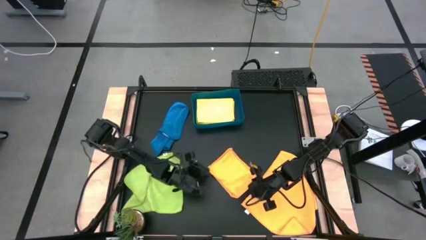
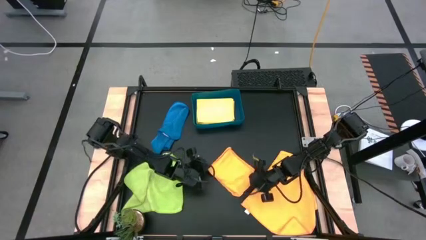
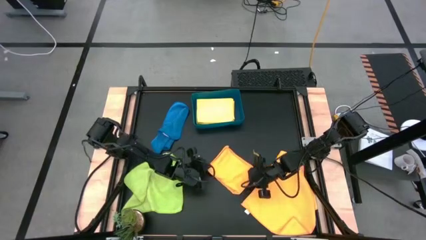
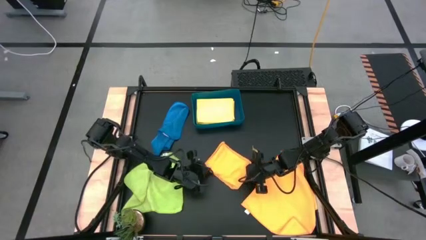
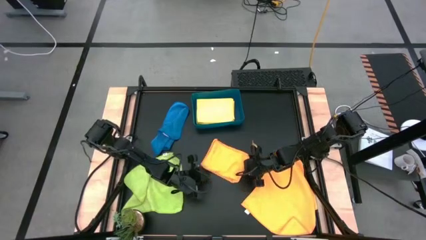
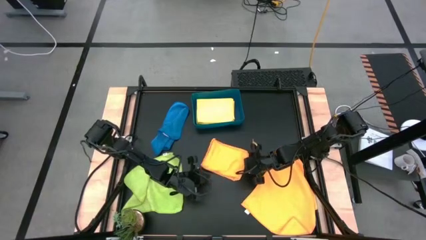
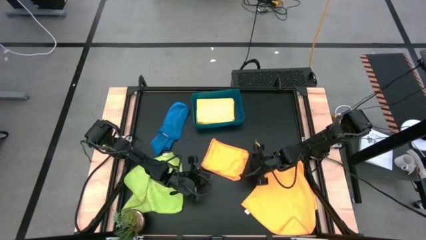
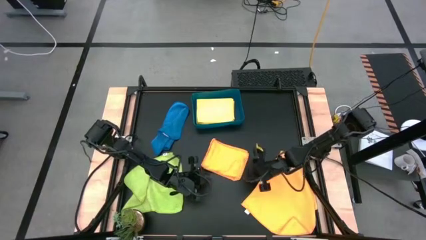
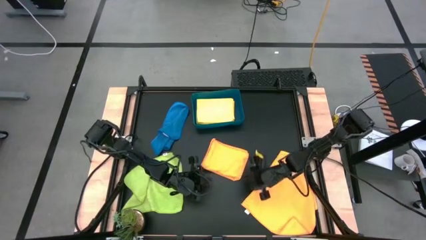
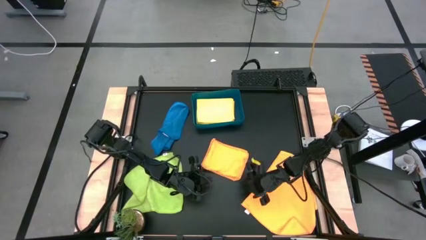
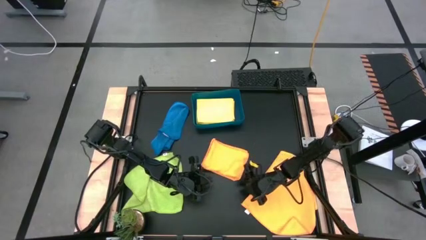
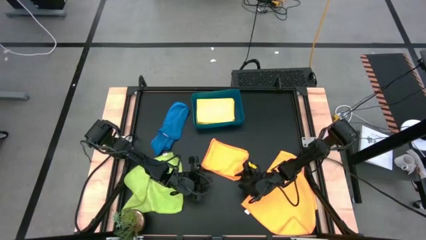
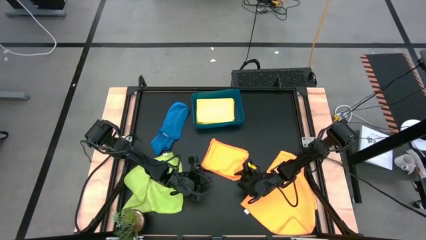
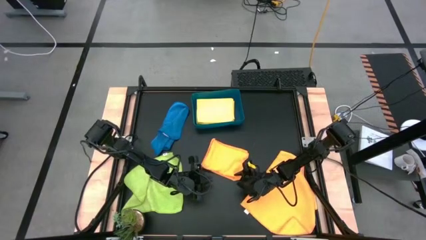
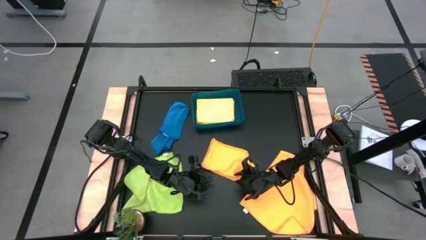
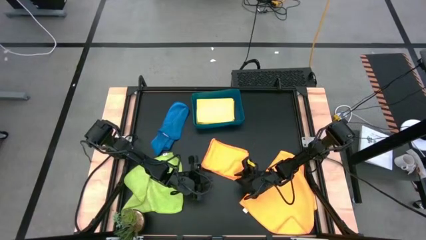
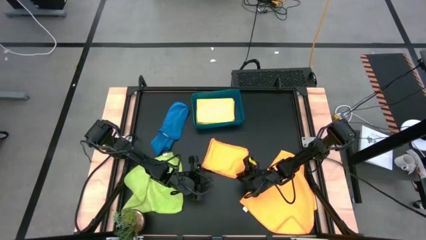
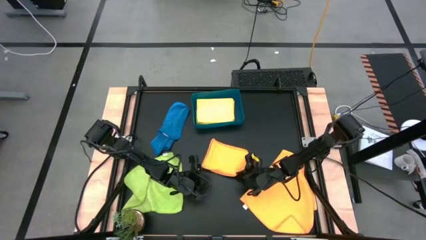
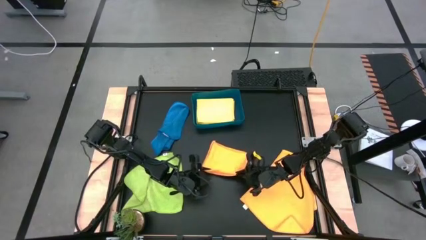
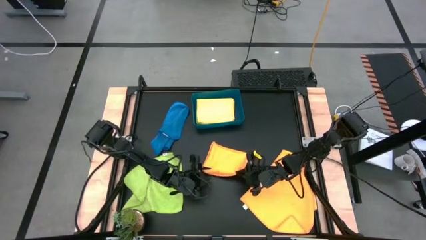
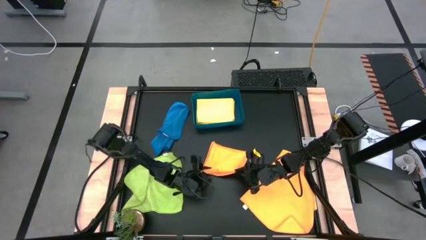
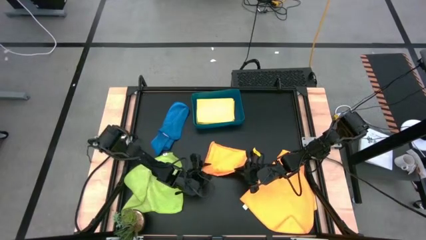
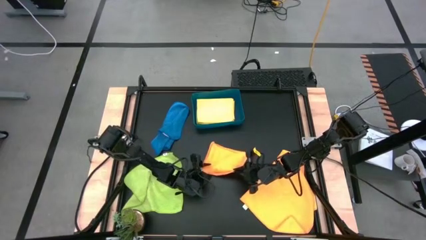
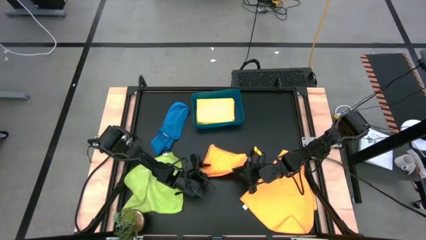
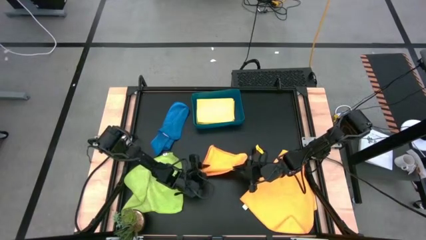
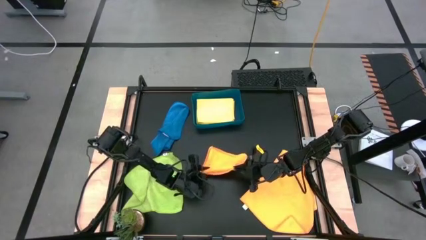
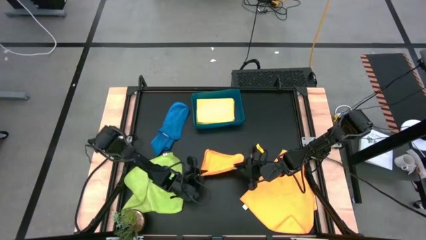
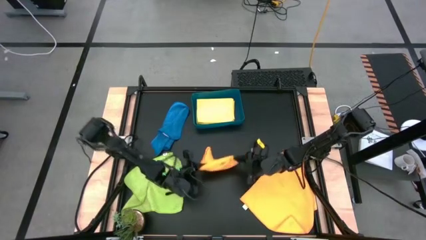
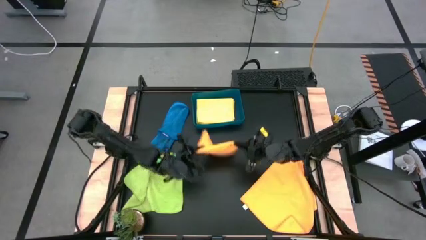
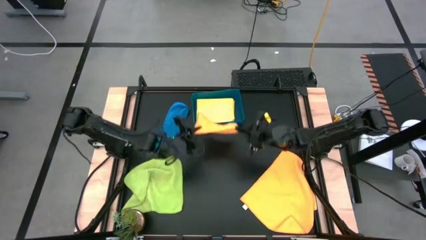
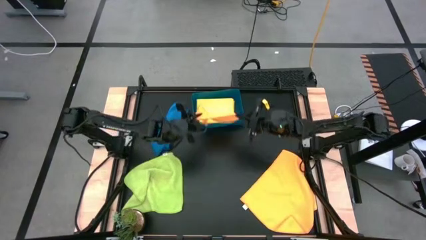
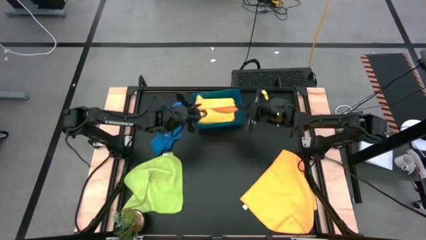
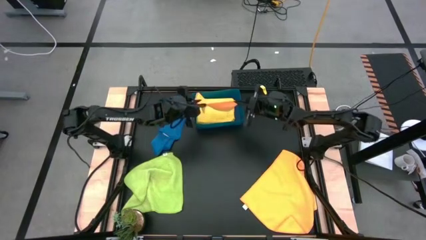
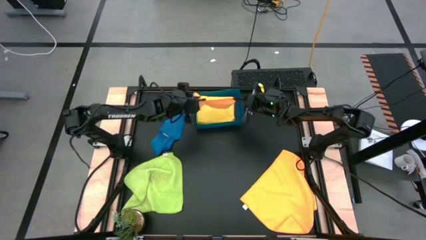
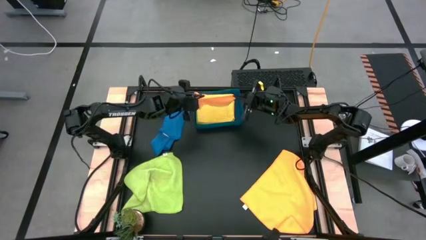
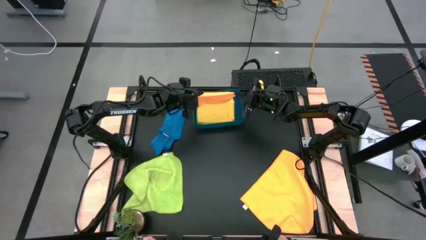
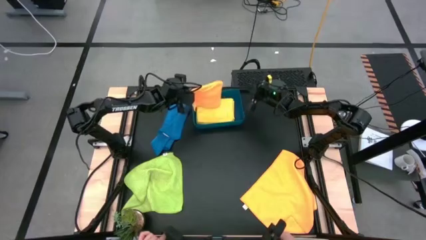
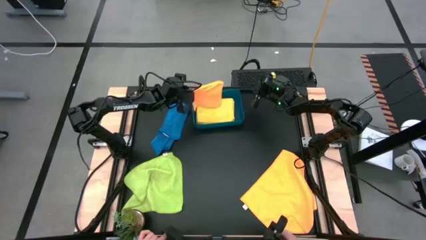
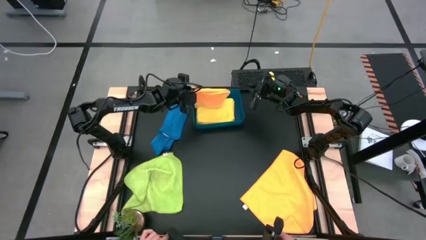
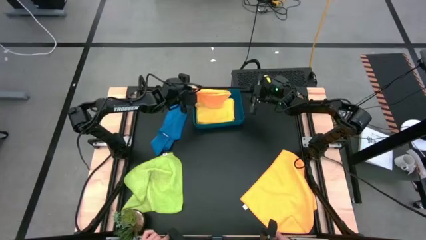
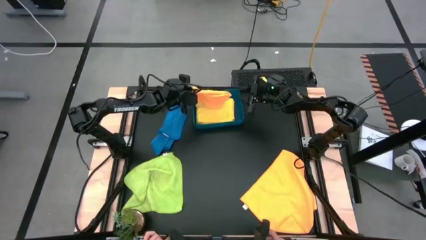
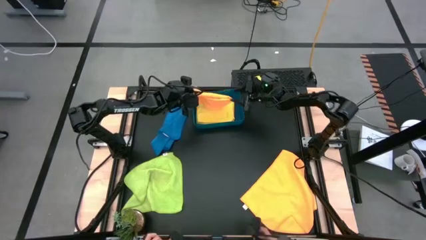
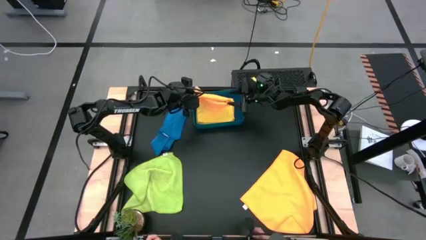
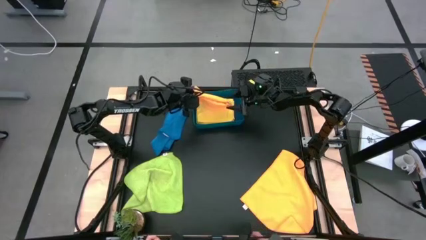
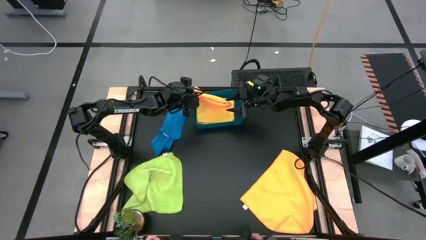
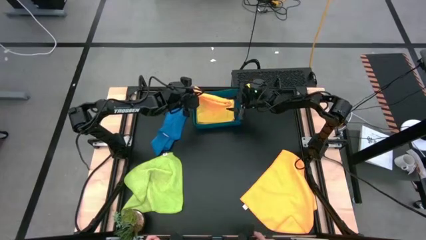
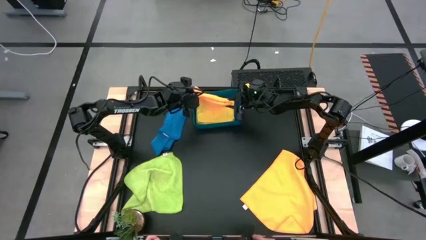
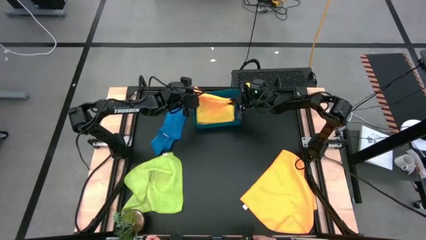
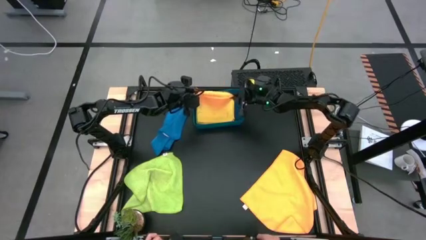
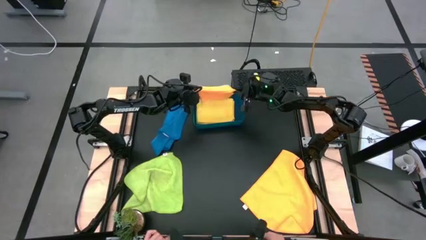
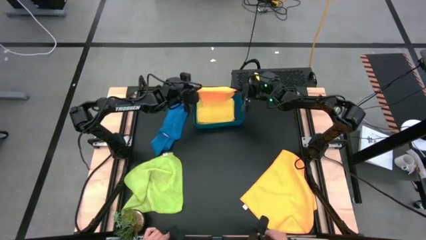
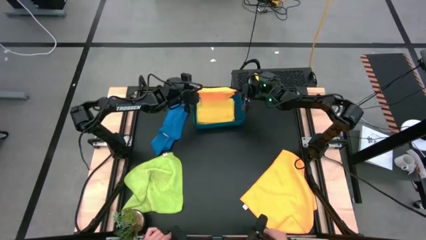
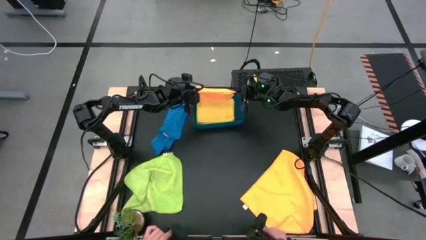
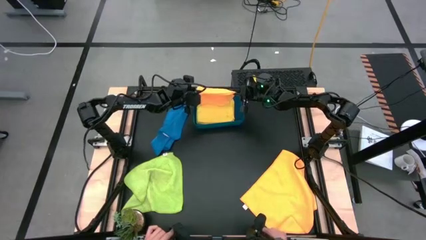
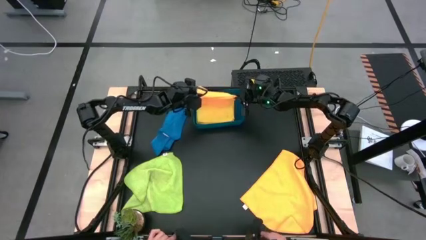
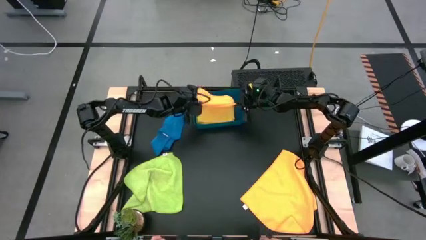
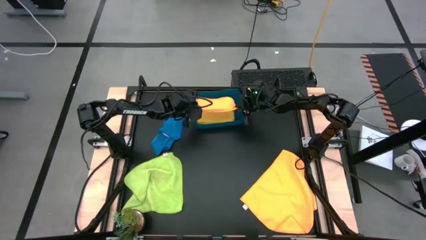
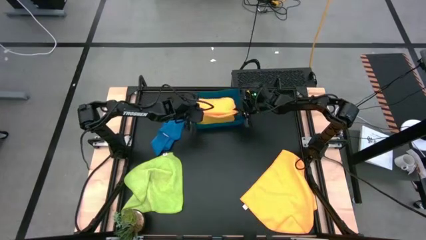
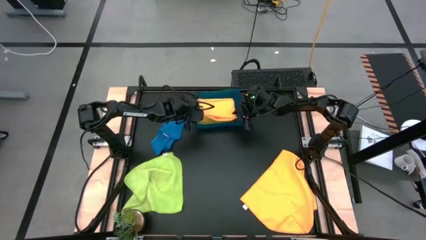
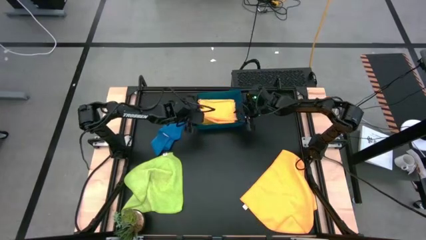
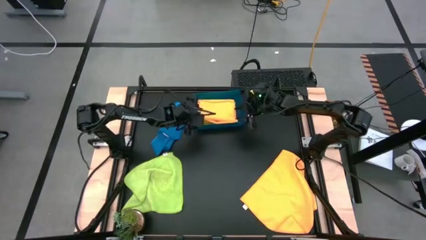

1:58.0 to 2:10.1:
Task: Fold microfiber towels
Put the folded orange microfiber cloth into the blue bin
